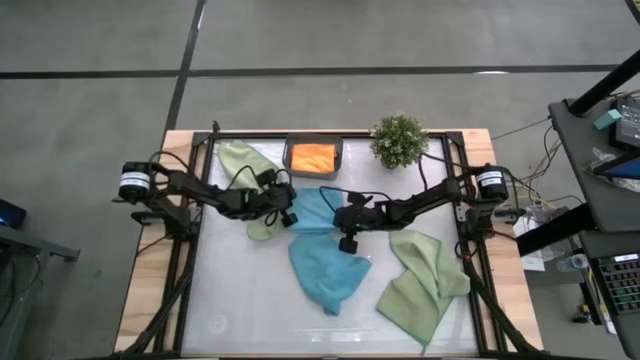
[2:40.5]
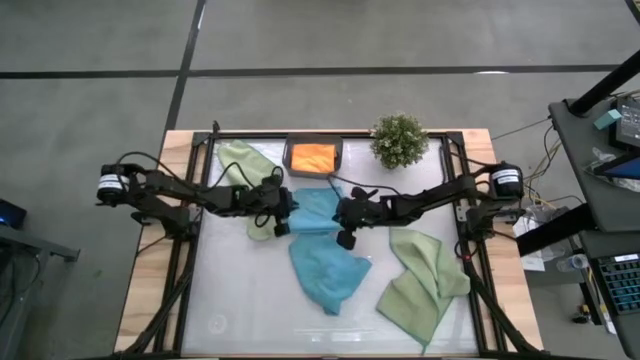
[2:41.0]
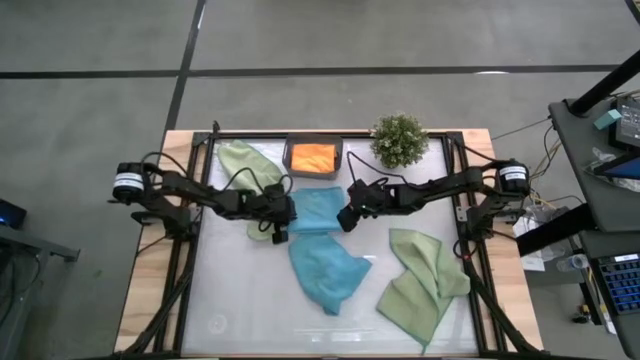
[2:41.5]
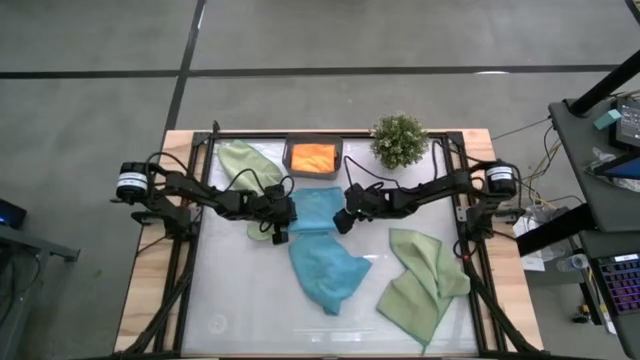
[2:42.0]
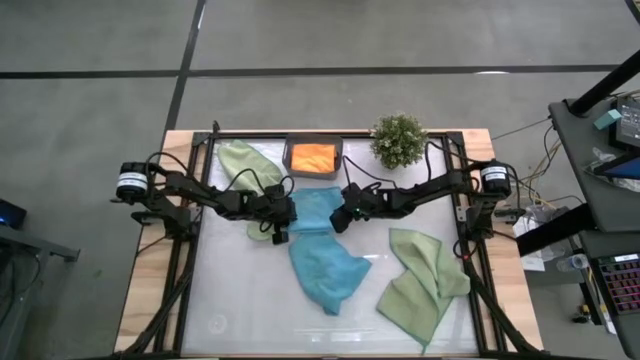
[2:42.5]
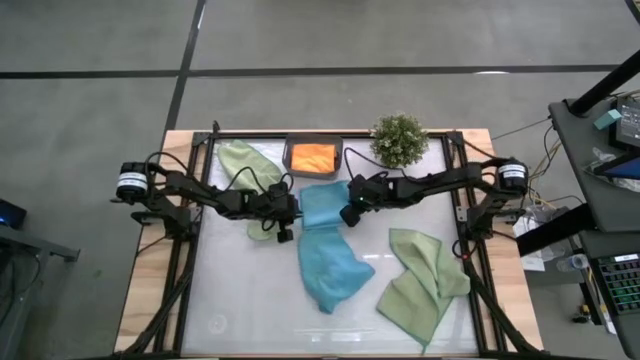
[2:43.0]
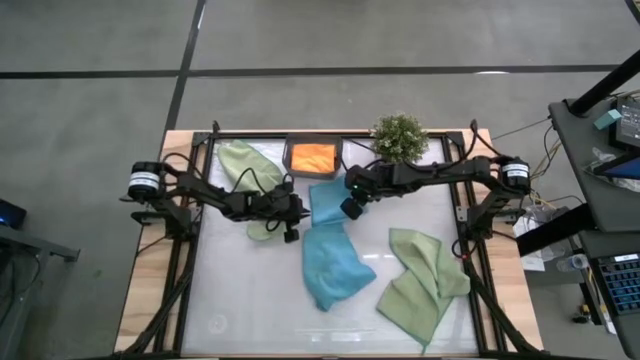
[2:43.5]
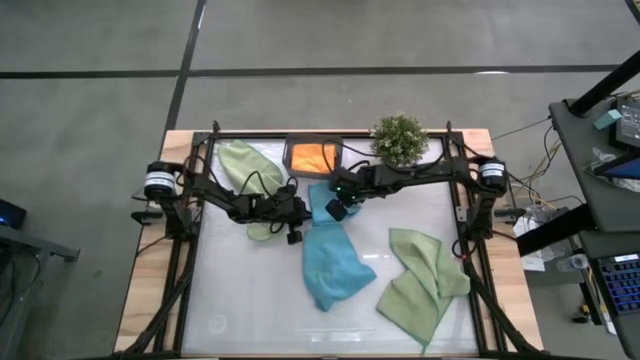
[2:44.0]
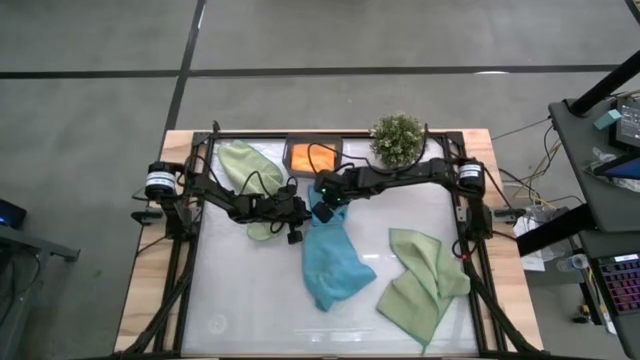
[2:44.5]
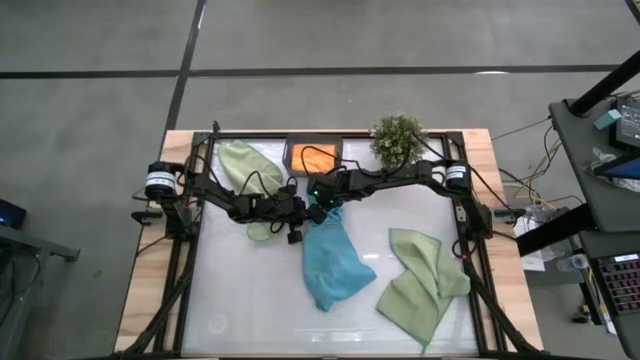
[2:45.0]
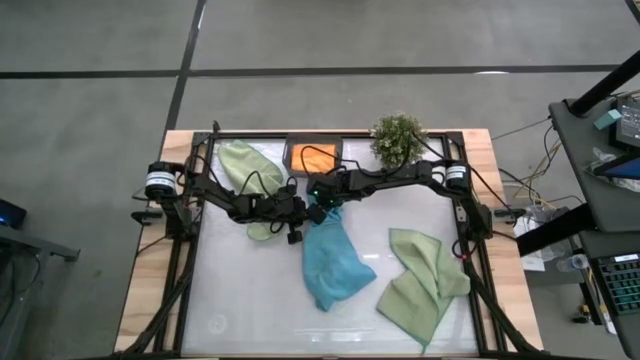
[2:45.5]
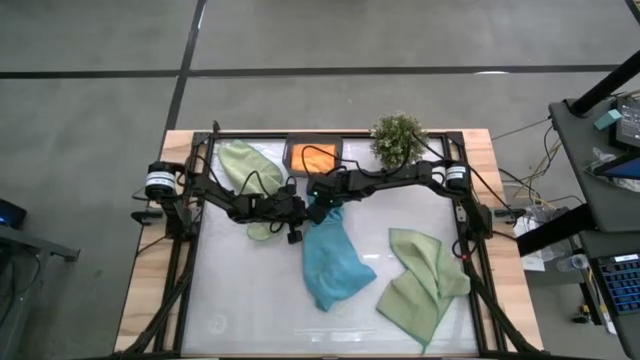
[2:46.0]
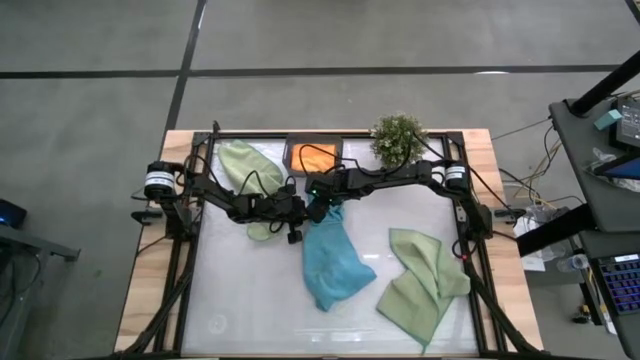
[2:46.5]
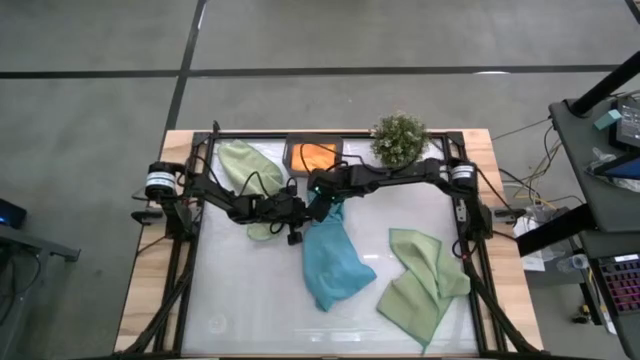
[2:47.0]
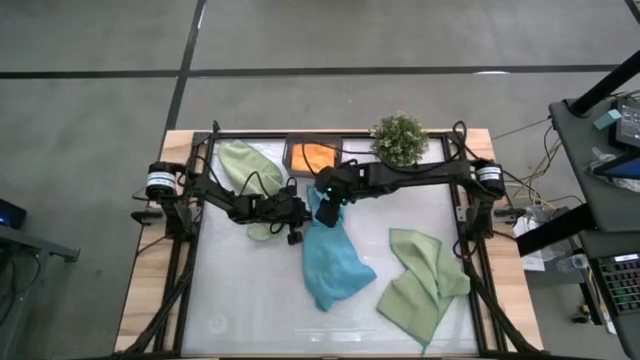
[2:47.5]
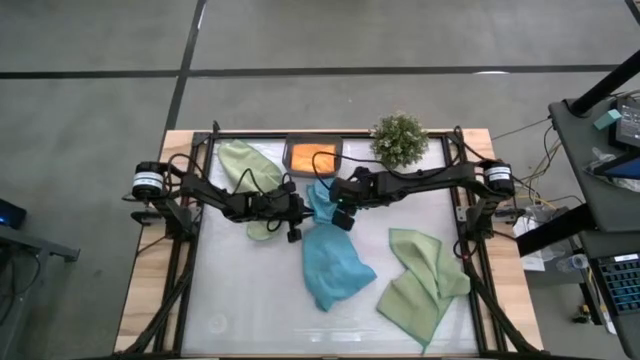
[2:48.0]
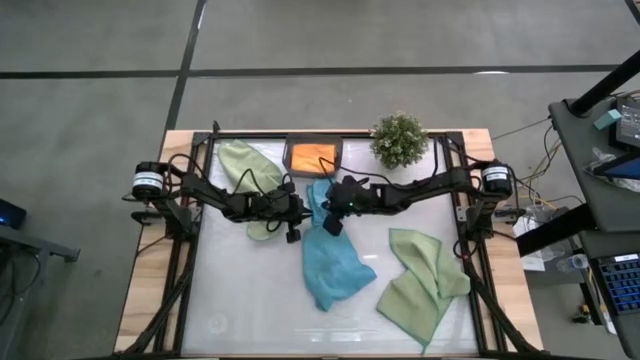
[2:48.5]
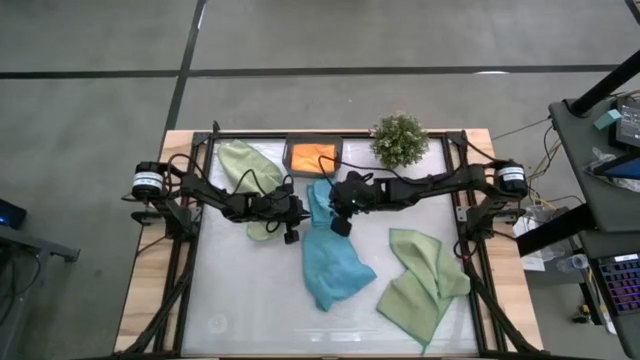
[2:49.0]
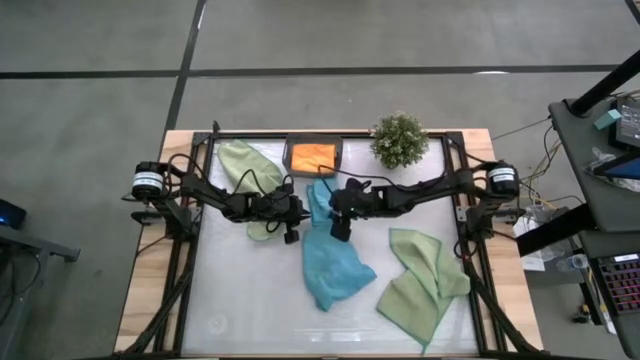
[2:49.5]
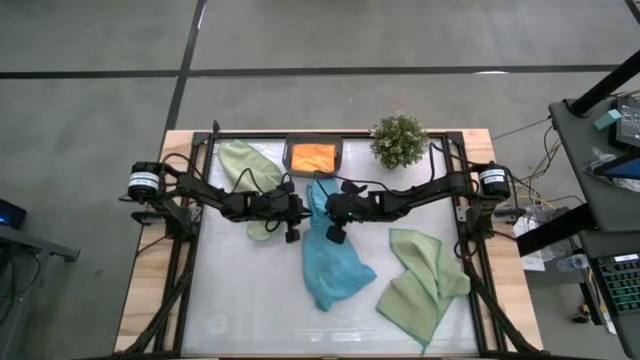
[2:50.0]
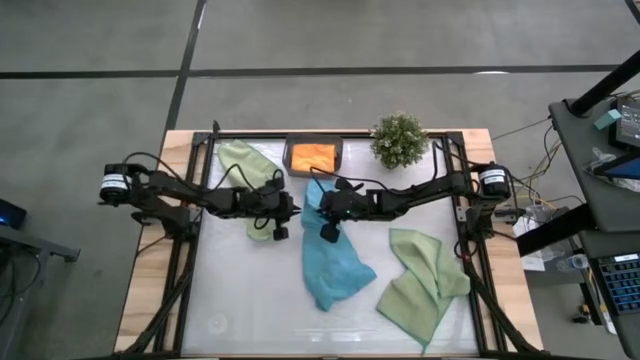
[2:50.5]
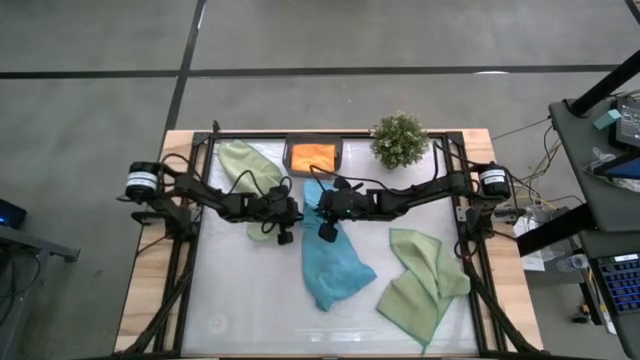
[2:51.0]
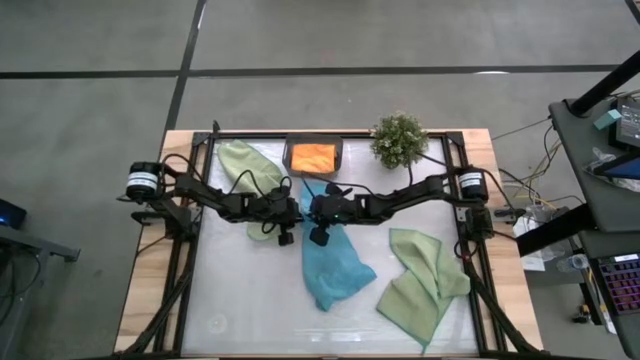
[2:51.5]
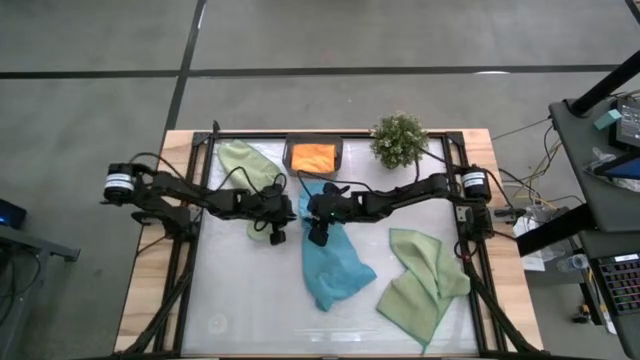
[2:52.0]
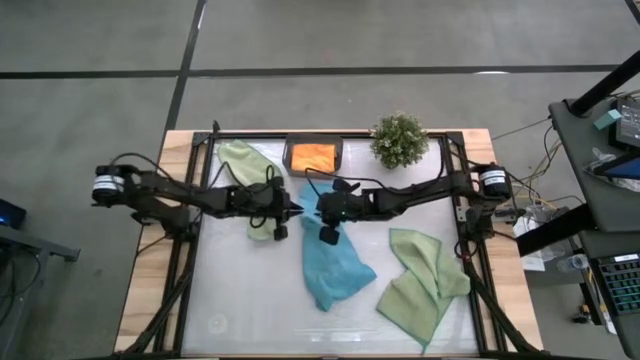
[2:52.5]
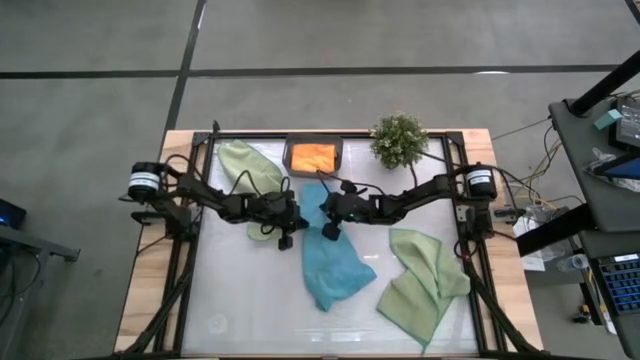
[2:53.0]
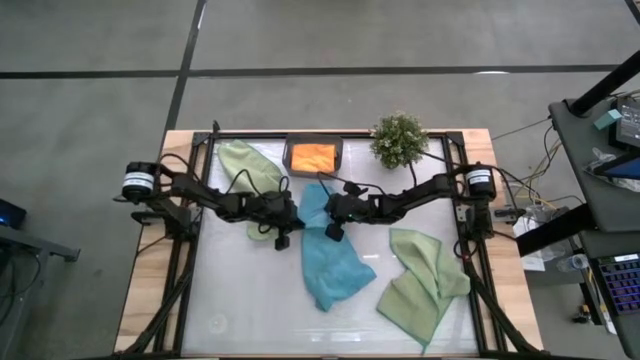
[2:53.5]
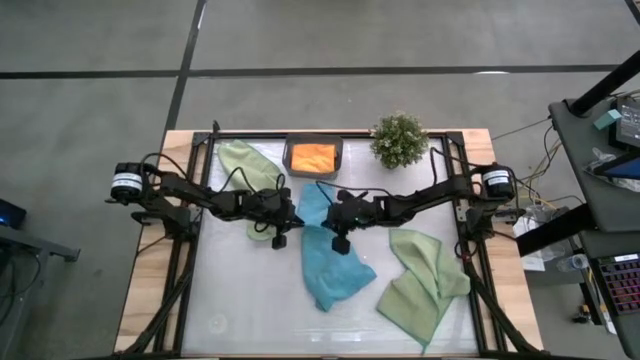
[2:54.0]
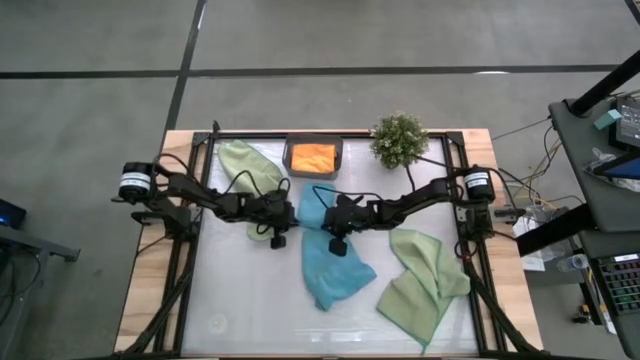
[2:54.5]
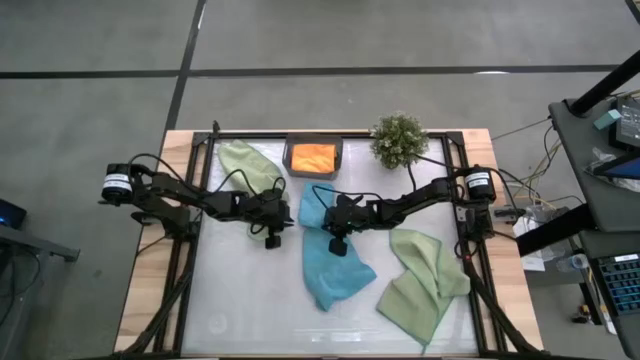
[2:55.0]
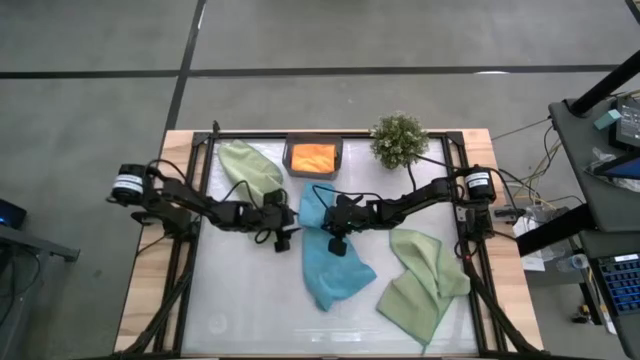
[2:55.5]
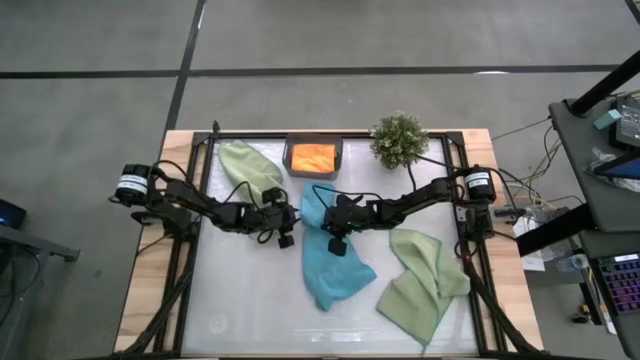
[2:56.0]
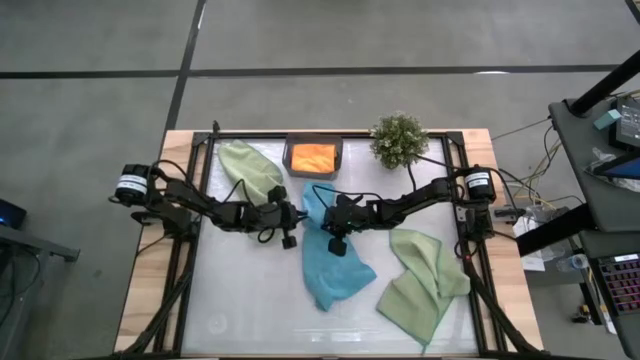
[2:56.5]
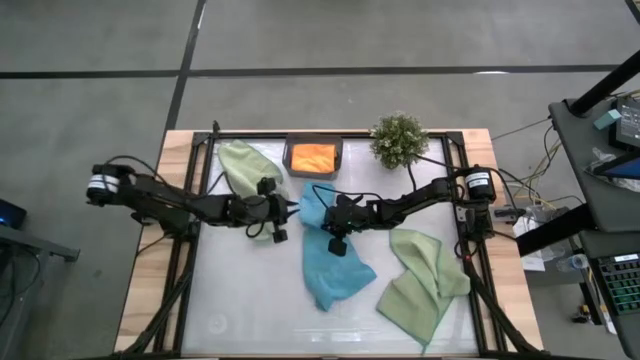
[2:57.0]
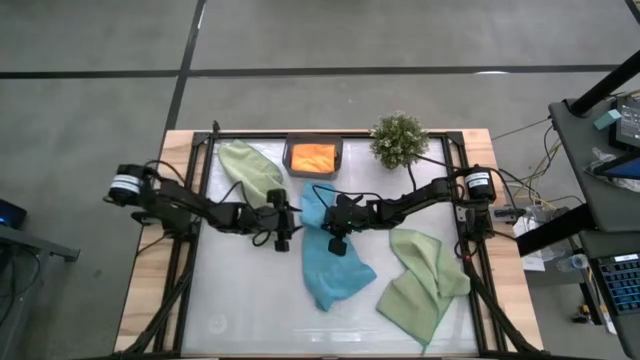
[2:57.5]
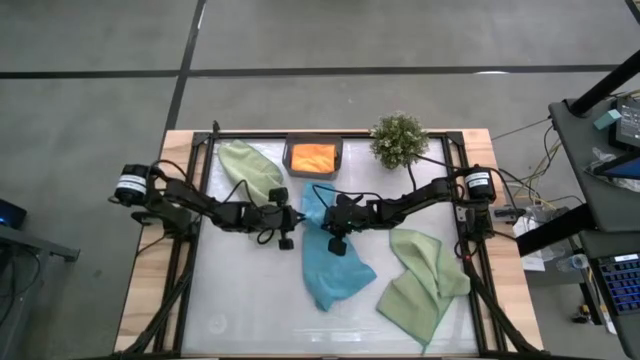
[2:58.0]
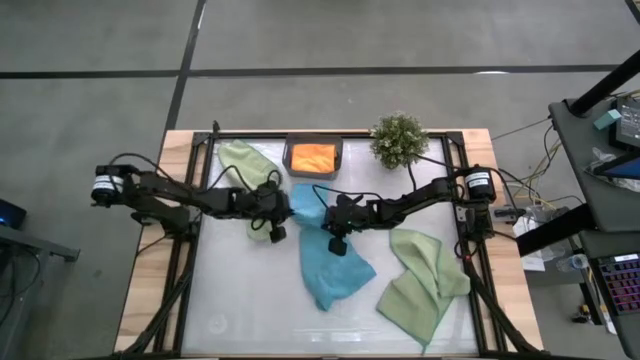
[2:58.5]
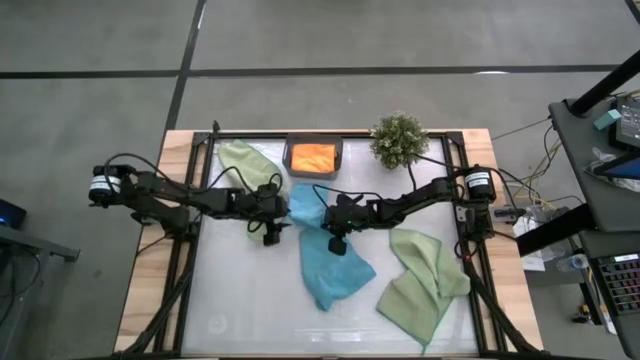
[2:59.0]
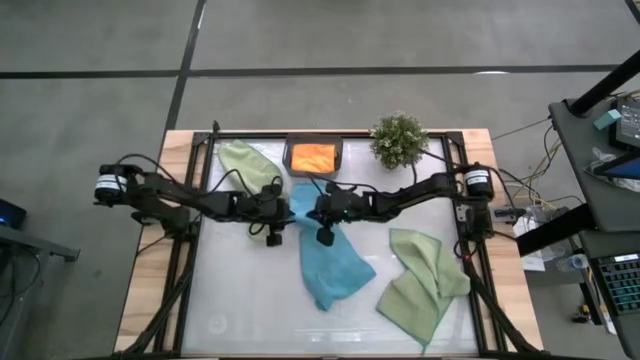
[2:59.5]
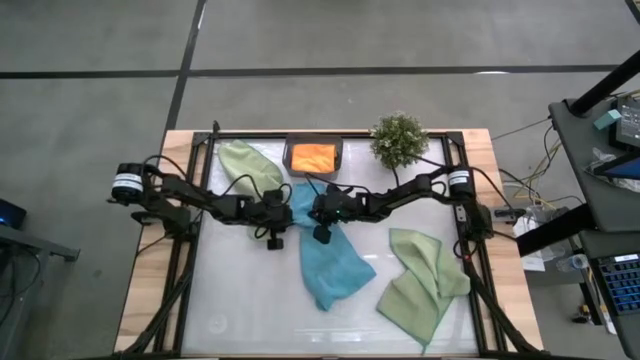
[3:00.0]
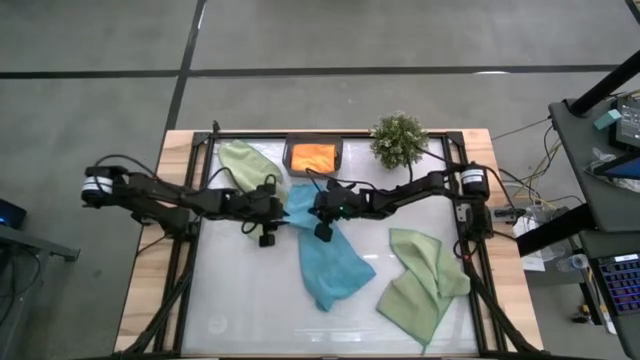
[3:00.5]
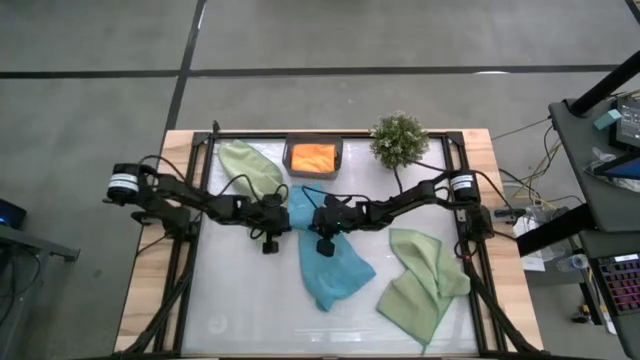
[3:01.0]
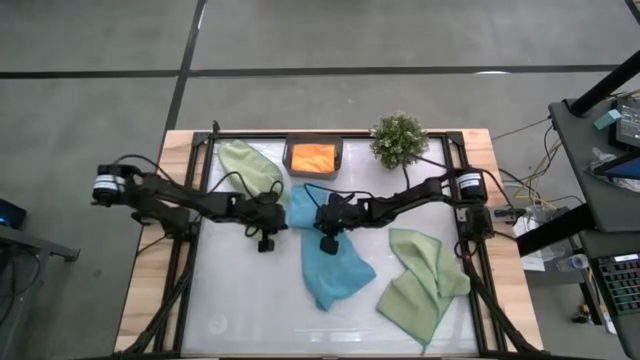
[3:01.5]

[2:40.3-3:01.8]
Task: Fold microfiber towels
Fold the left blue microfiber towel
